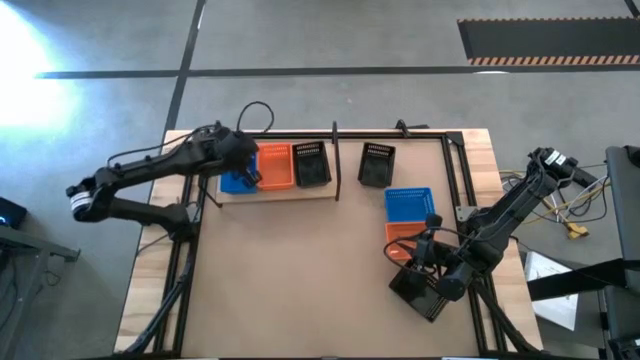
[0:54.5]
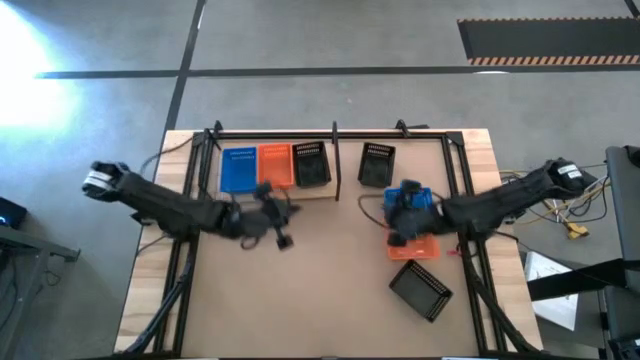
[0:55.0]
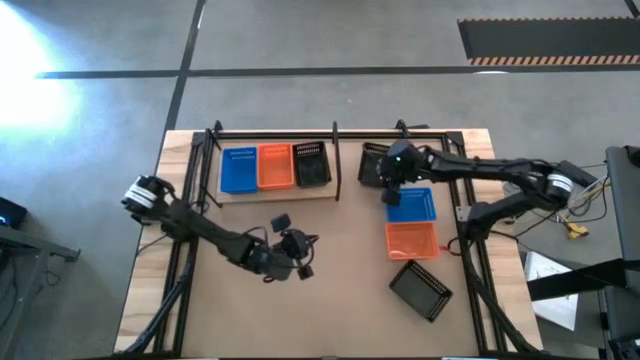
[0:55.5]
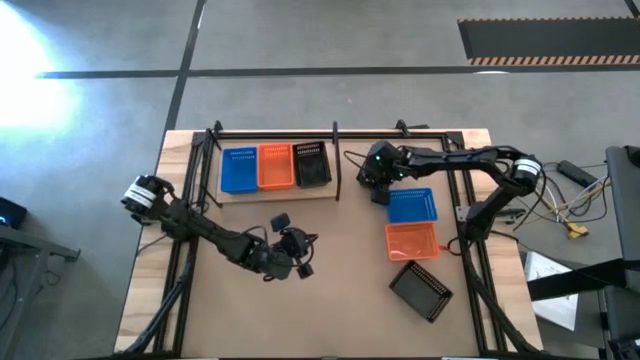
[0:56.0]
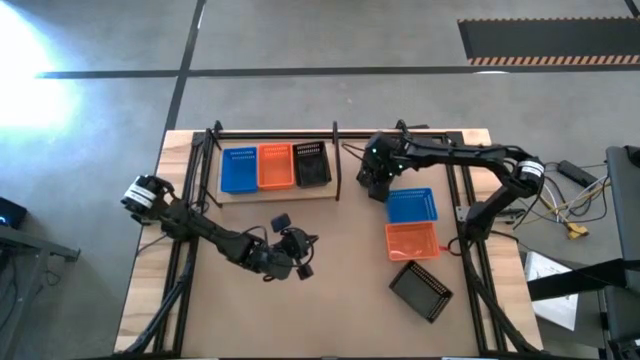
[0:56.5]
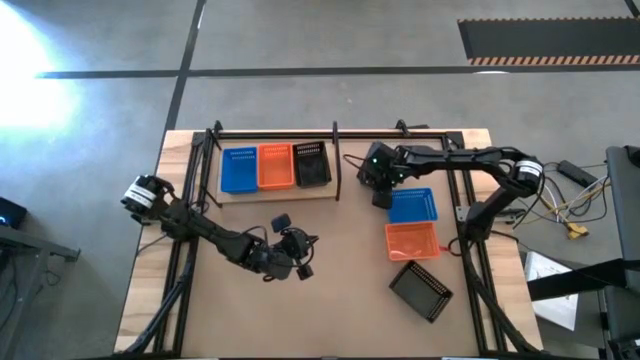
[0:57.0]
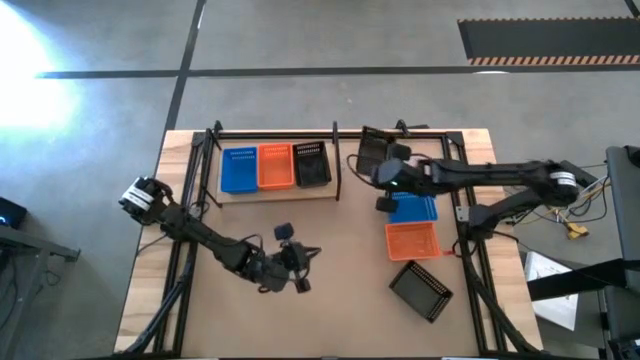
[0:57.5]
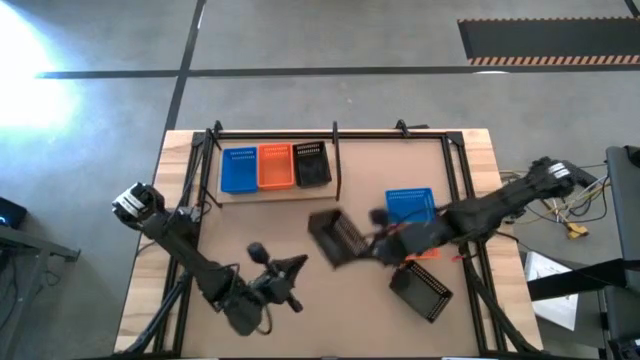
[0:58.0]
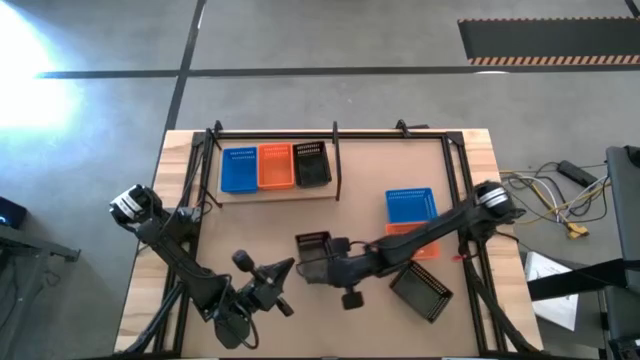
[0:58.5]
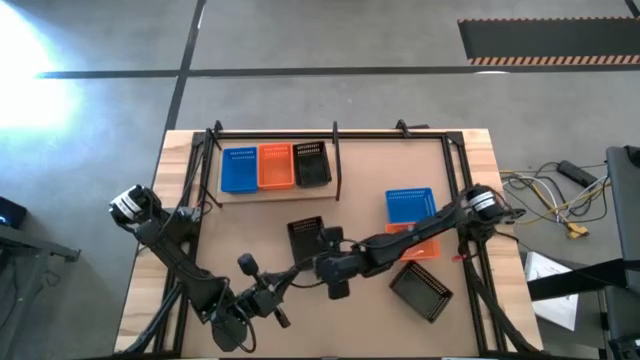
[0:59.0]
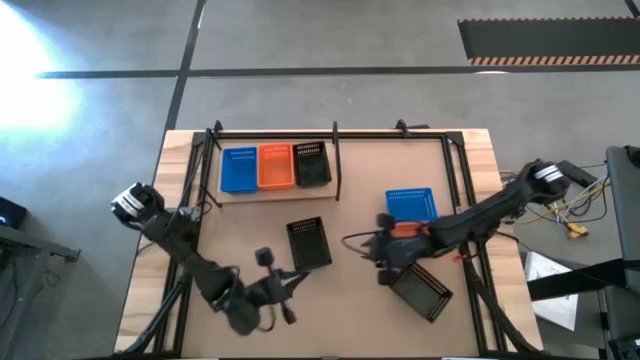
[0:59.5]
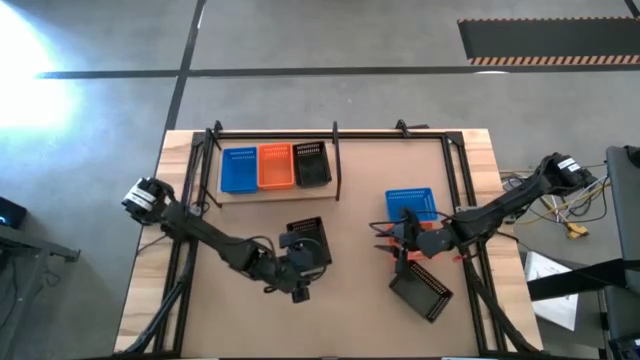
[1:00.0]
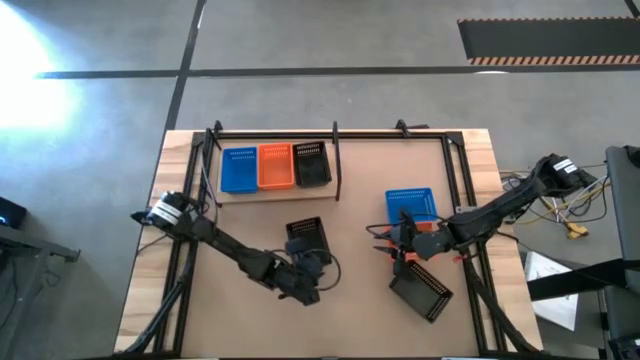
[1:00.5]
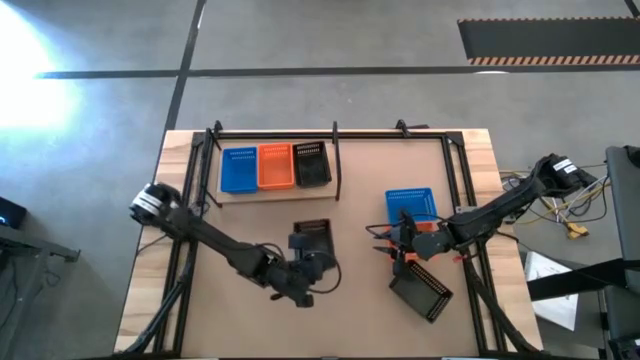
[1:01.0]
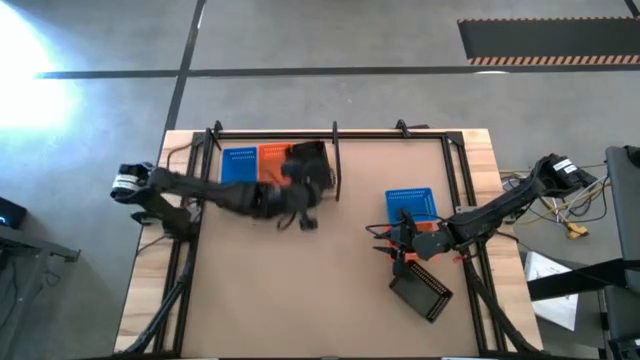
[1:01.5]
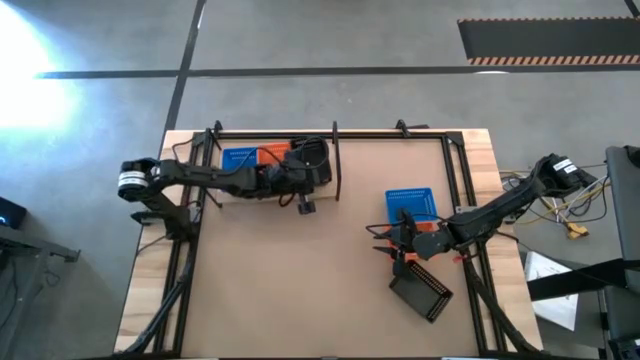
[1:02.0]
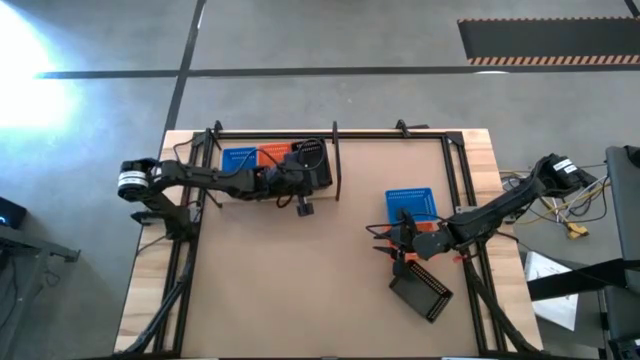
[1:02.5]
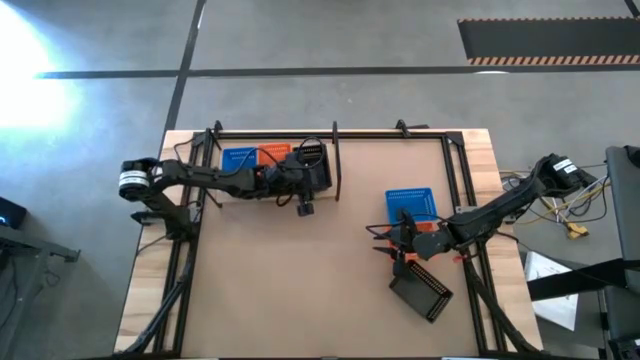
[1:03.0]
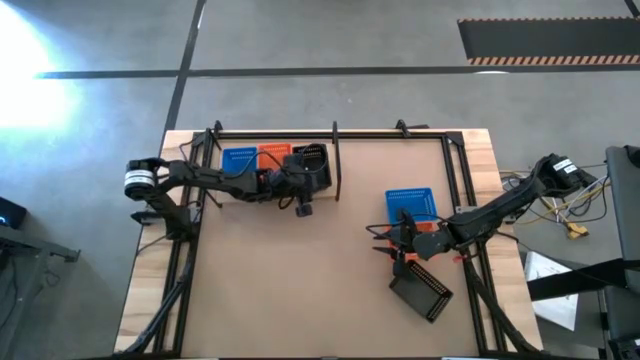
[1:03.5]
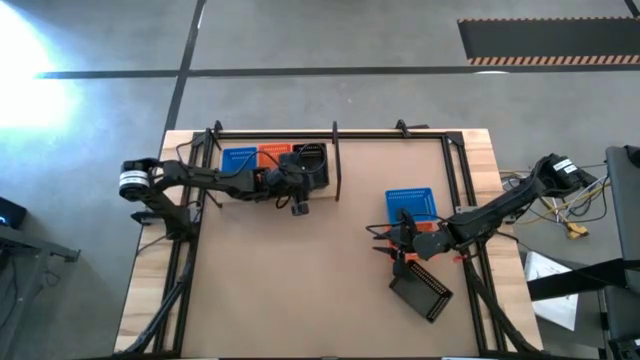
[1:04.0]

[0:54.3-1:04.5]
Task: Stack baskets on shelf by color
Stack the top black basket on top of the other black basket on the shelf

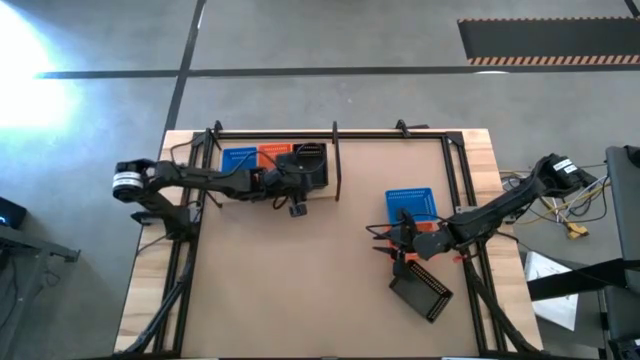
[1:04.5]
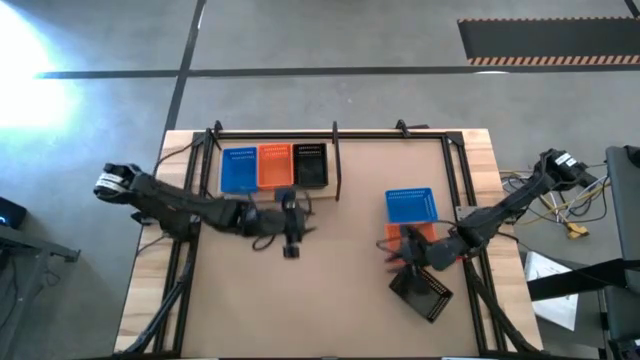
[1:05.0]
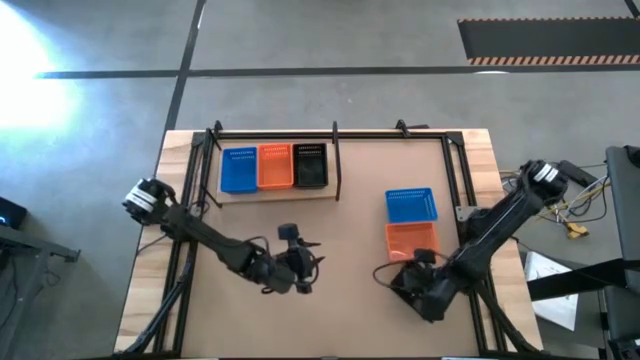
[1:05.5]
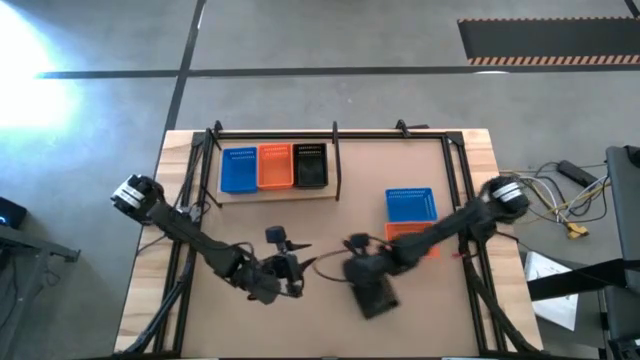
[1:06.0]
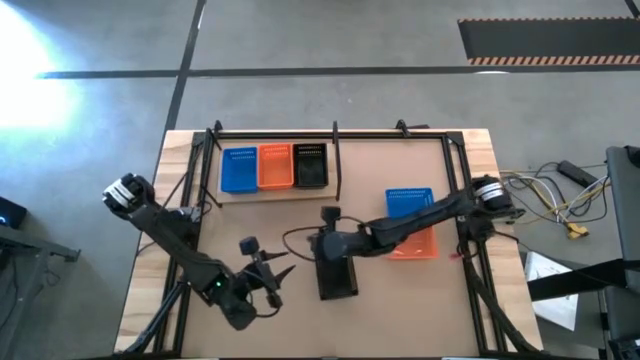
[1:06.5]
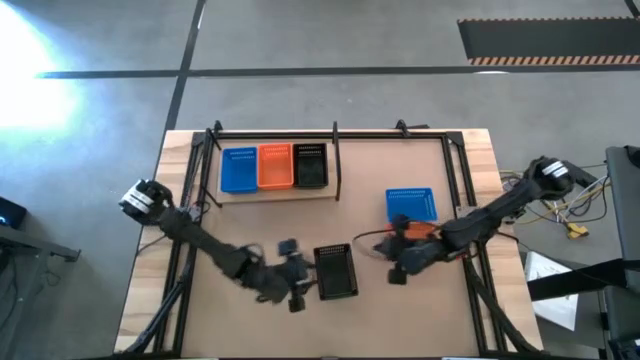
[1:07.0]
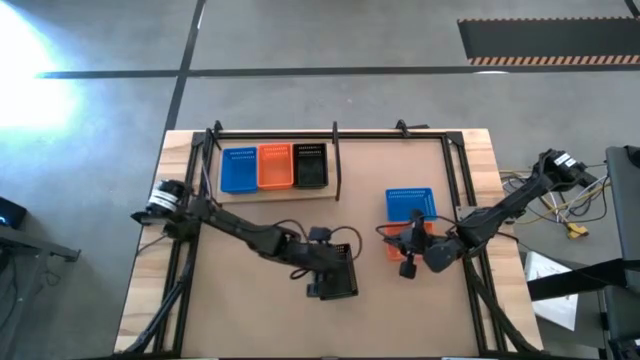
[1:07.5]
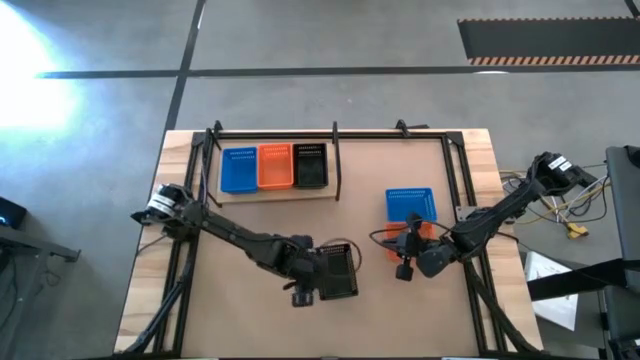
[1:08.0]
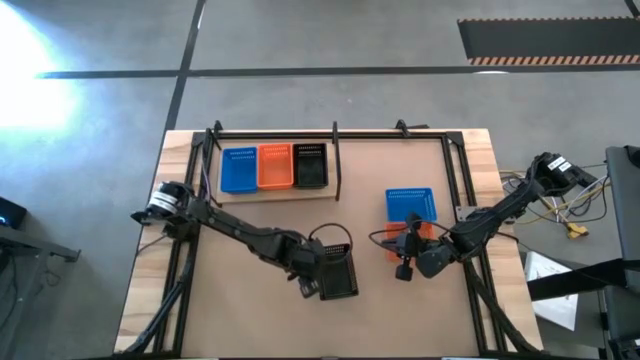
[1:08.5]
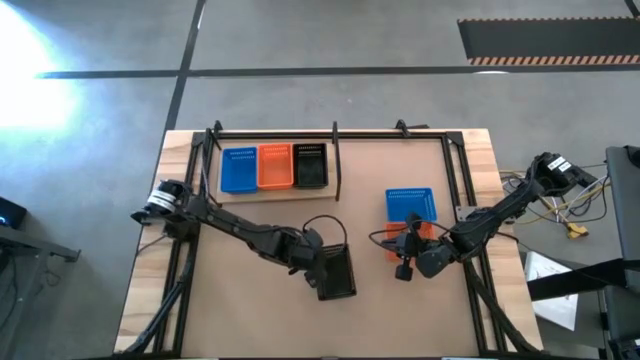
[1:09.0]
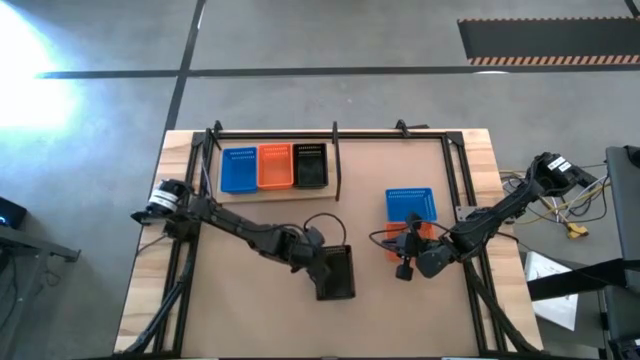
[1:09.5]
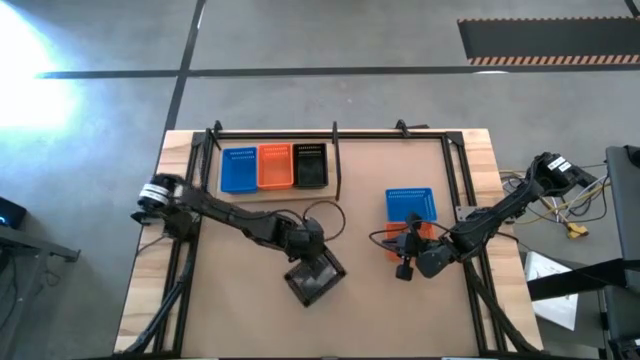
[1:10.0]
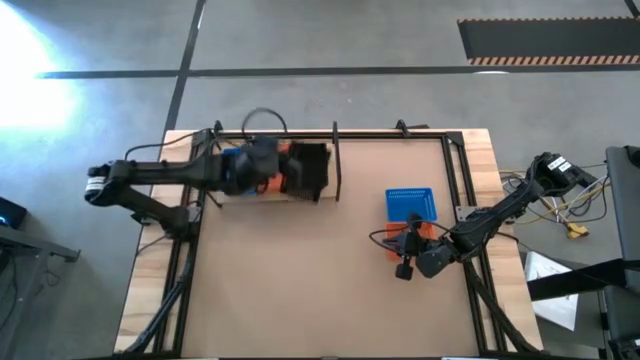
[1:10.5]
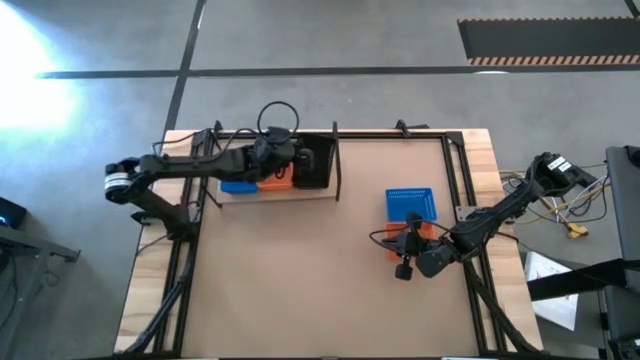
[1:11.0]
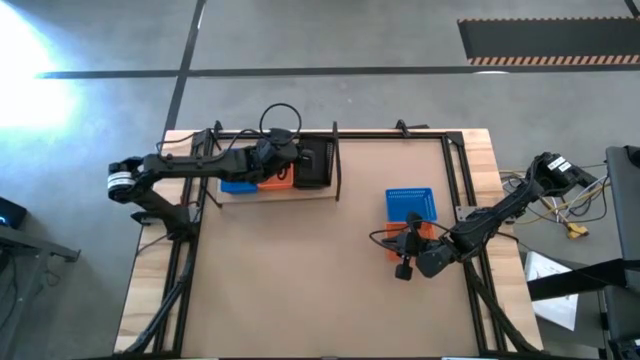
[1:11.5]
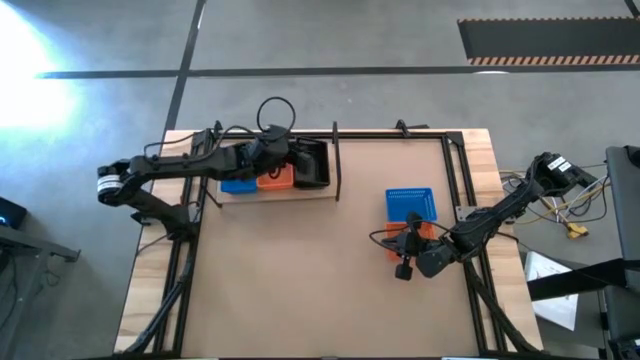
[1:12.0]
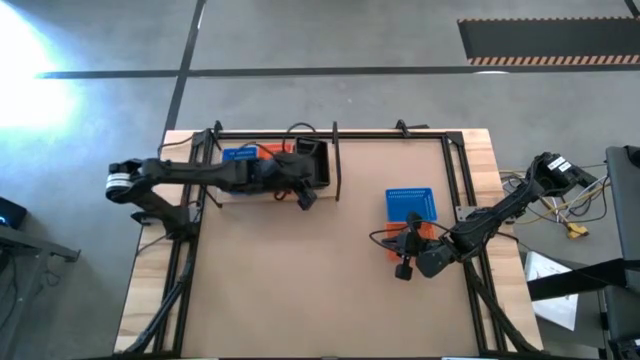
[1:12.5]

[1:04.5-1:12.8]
Stack the black basket on top of the stacked black baskets on the shelf

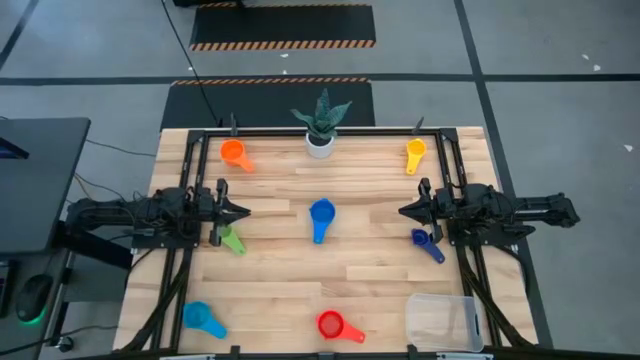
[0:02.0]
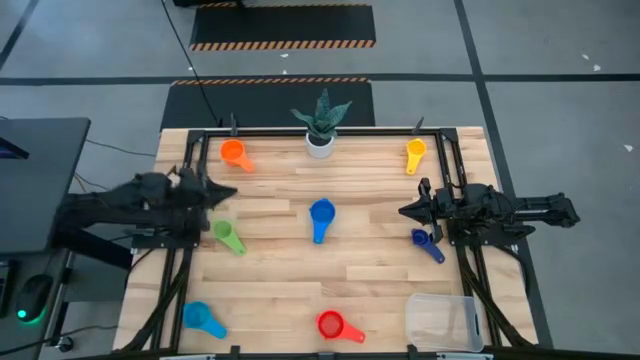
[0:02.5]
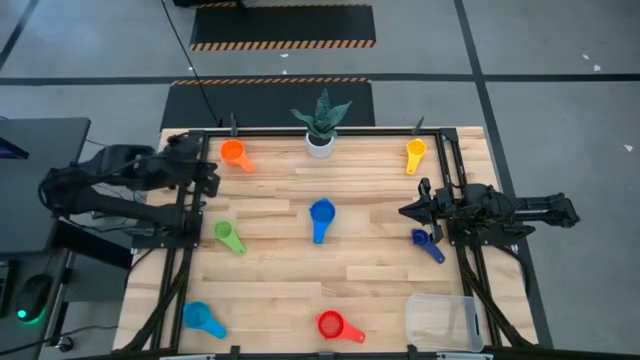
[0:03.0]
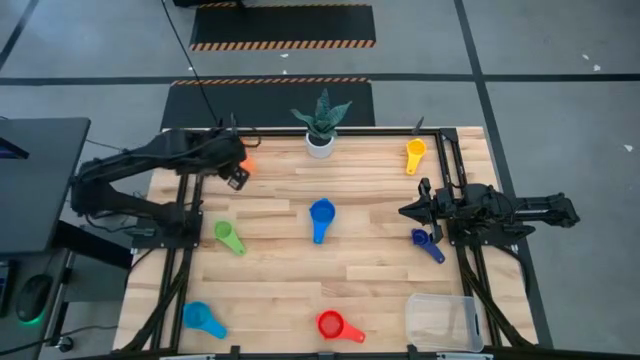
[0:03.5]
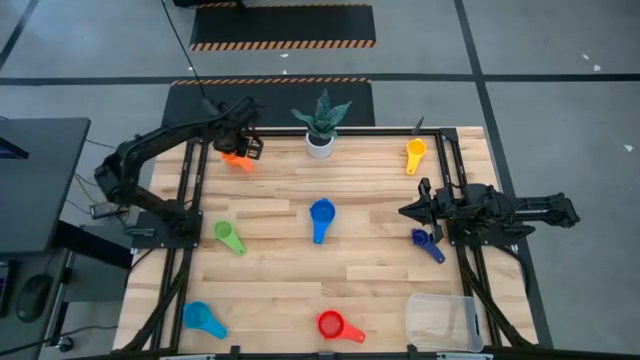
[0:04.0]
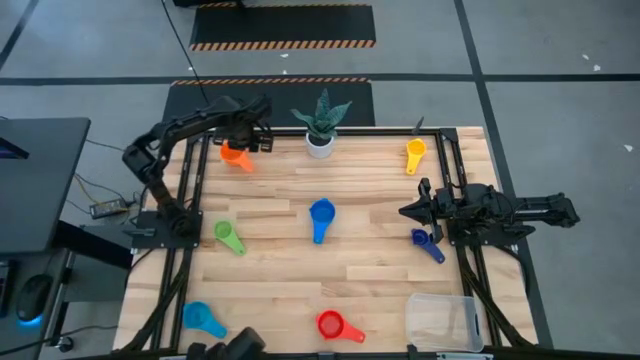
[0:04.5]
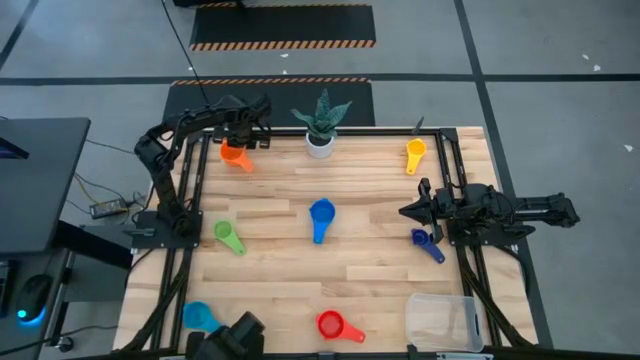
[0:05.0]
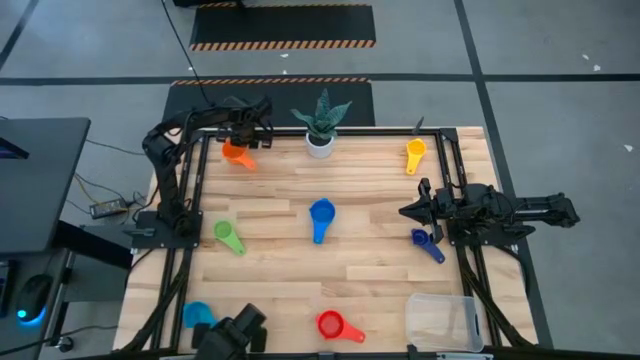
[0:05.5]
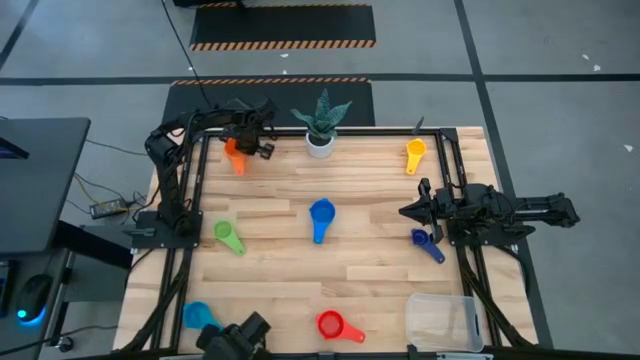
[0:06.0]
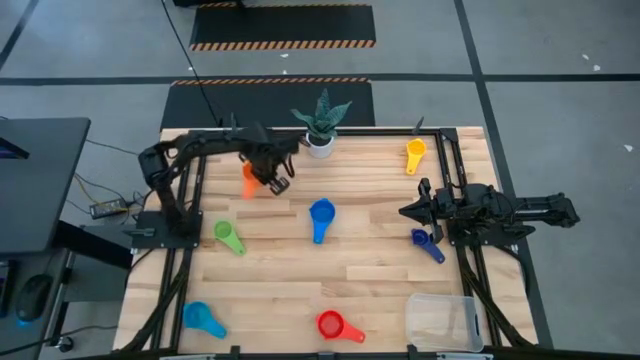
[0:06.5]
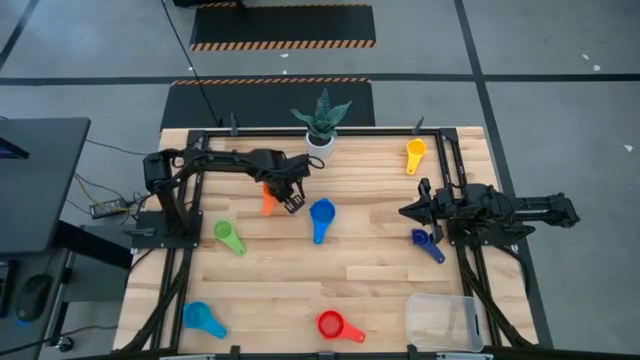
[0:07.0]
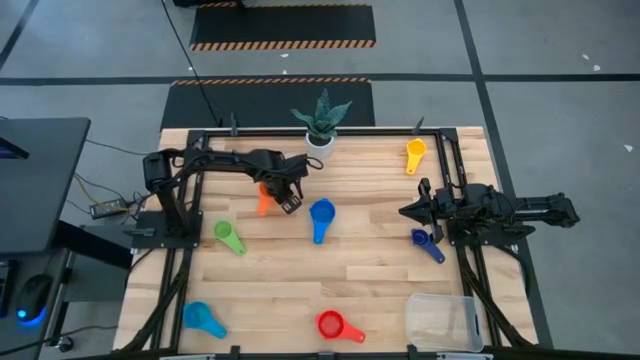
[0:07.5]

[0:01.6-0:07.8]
Task: Nest measuring cups in basket
Prepare the orange measuring cup
